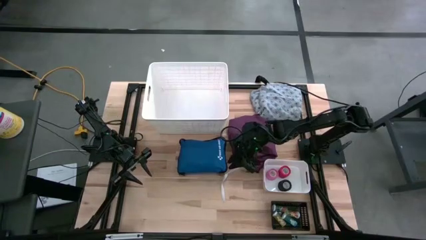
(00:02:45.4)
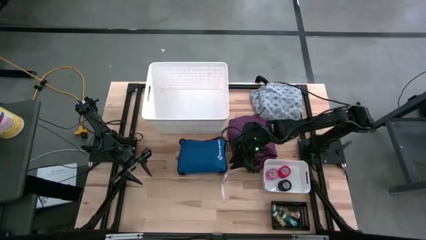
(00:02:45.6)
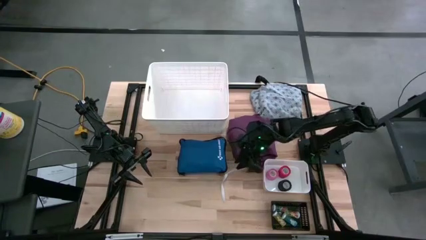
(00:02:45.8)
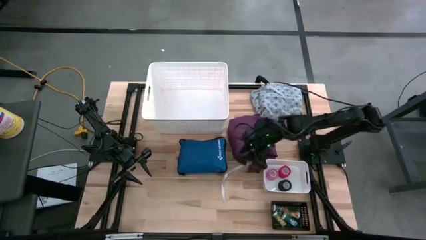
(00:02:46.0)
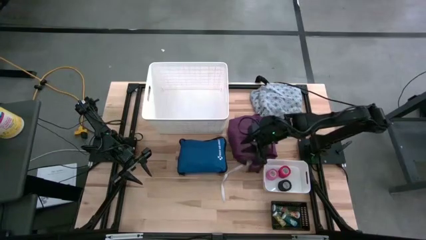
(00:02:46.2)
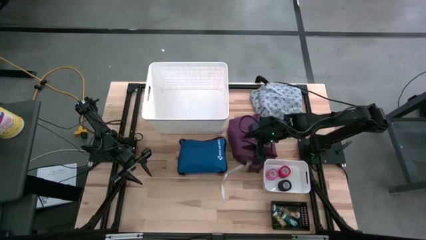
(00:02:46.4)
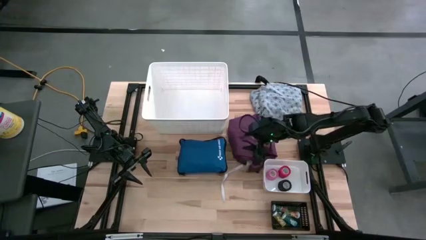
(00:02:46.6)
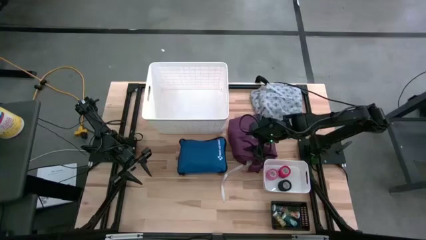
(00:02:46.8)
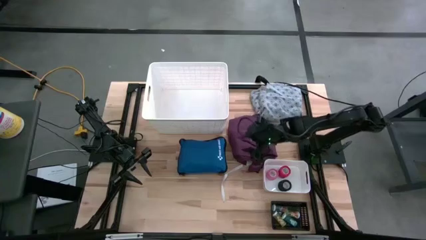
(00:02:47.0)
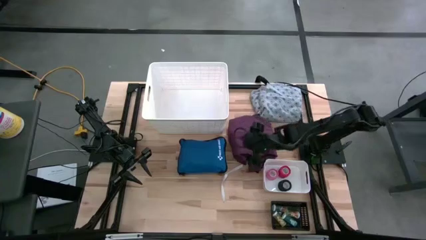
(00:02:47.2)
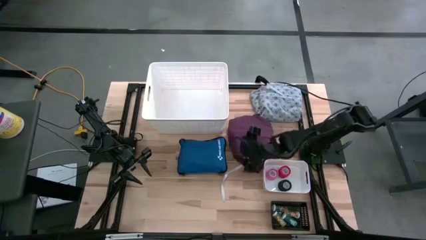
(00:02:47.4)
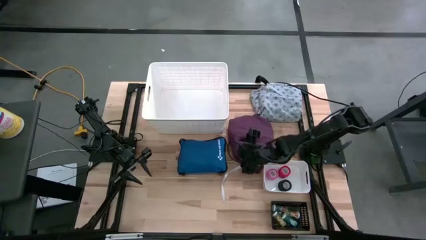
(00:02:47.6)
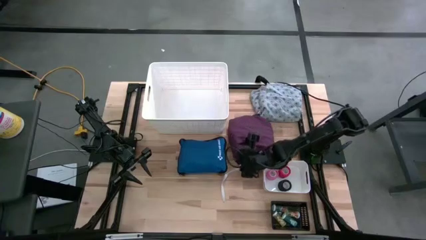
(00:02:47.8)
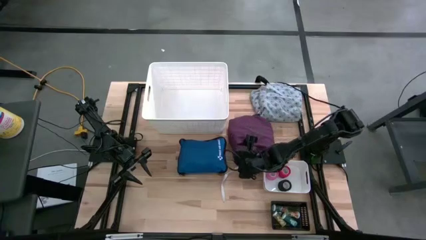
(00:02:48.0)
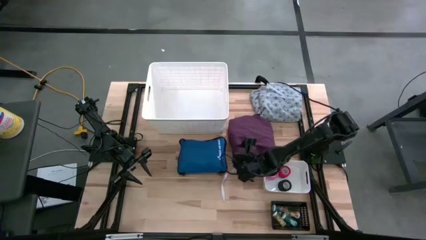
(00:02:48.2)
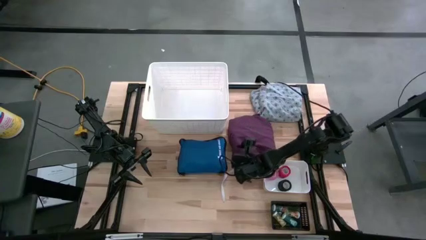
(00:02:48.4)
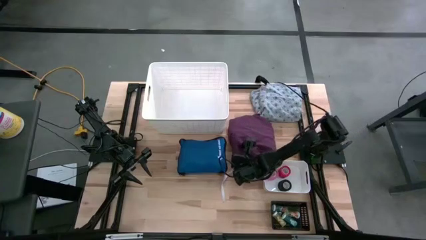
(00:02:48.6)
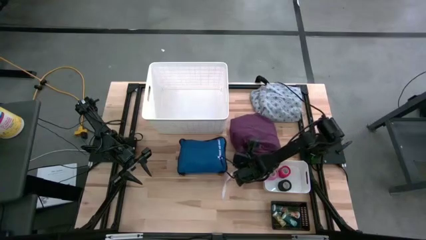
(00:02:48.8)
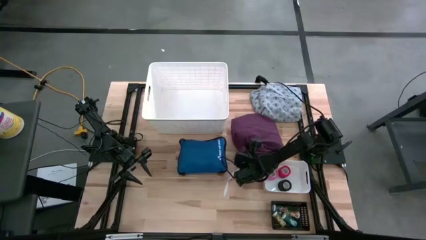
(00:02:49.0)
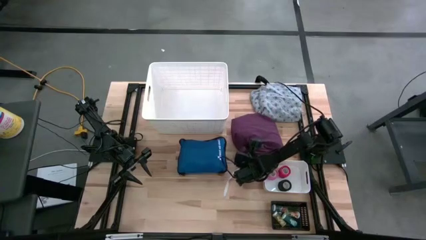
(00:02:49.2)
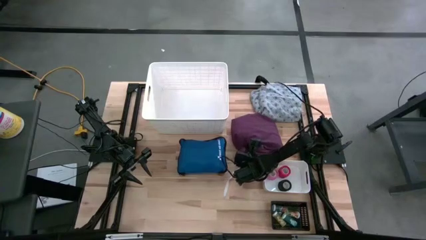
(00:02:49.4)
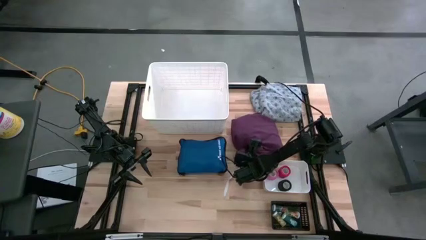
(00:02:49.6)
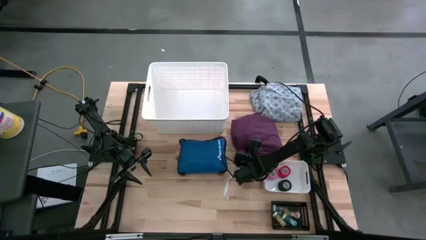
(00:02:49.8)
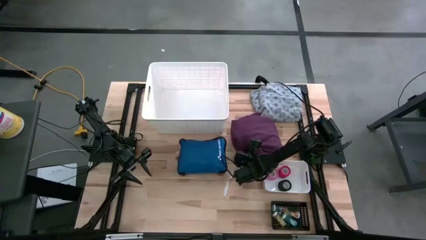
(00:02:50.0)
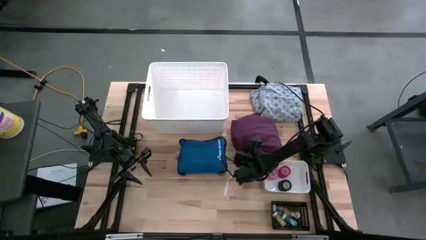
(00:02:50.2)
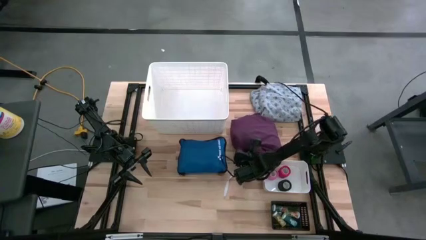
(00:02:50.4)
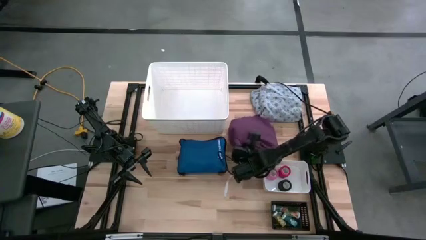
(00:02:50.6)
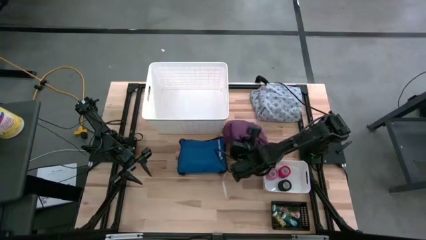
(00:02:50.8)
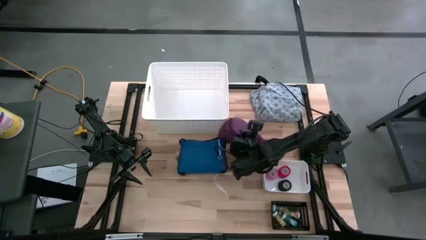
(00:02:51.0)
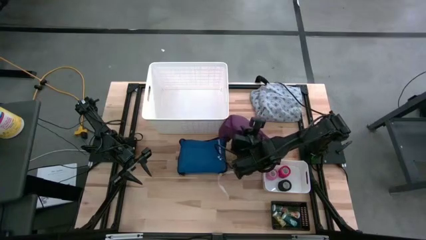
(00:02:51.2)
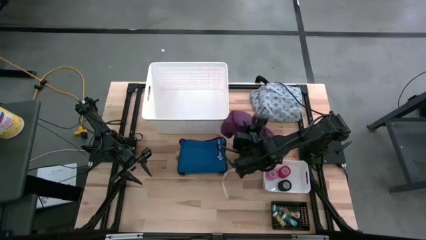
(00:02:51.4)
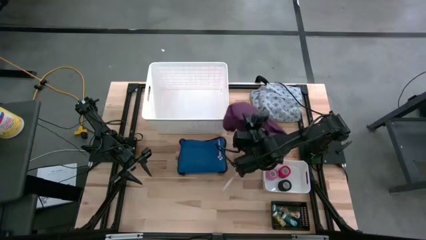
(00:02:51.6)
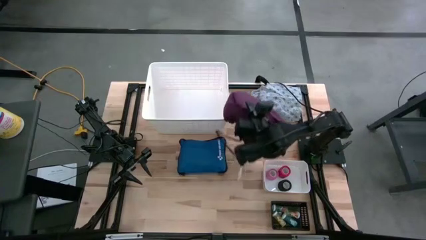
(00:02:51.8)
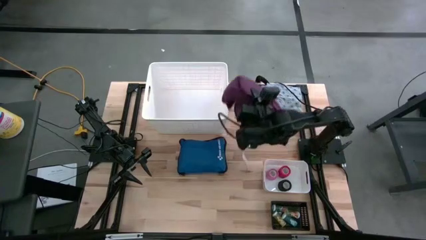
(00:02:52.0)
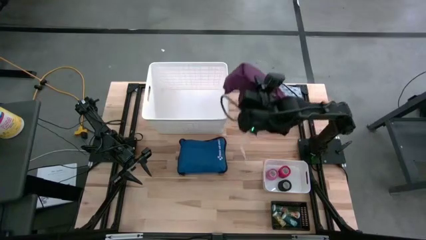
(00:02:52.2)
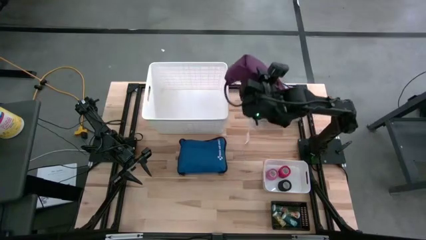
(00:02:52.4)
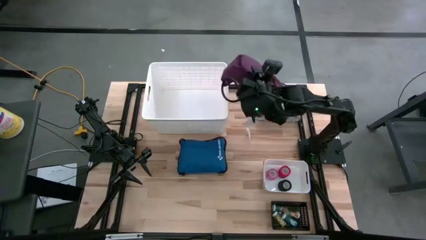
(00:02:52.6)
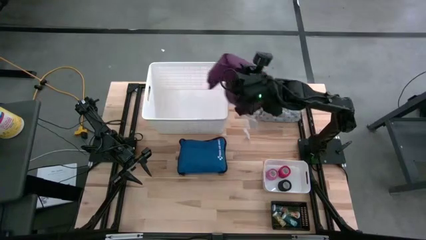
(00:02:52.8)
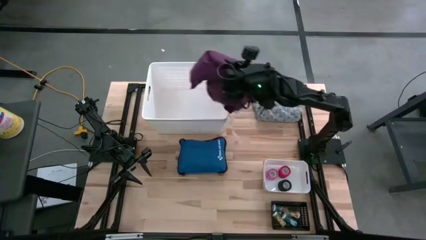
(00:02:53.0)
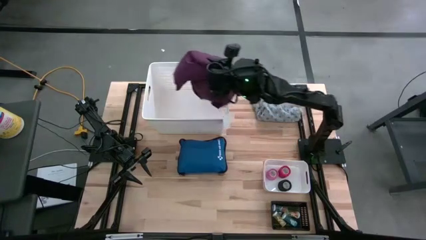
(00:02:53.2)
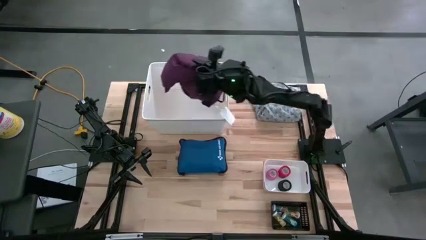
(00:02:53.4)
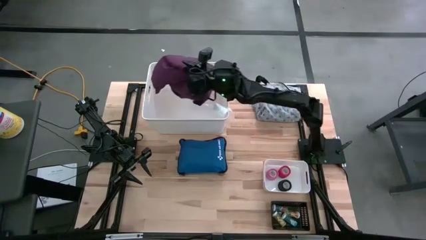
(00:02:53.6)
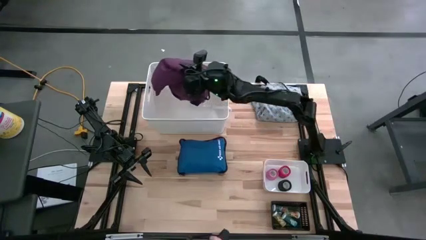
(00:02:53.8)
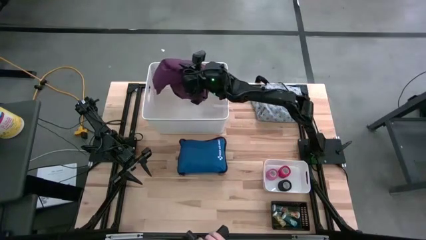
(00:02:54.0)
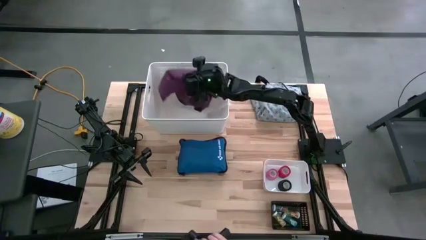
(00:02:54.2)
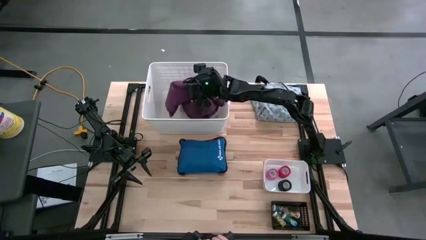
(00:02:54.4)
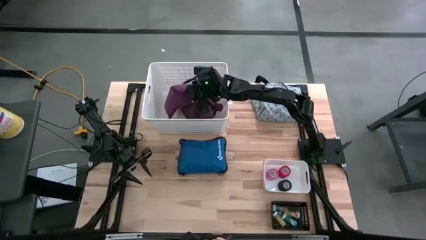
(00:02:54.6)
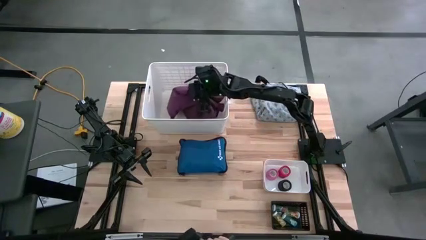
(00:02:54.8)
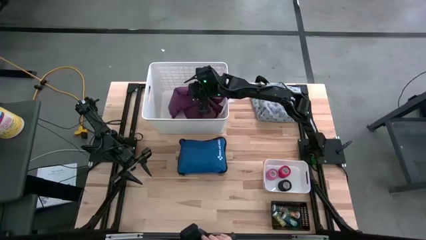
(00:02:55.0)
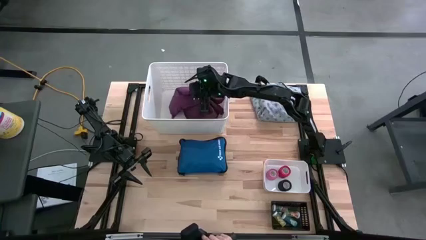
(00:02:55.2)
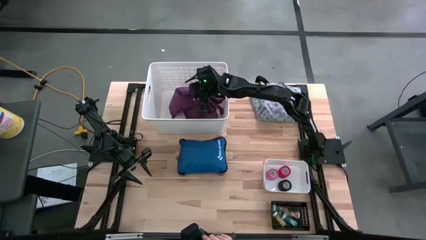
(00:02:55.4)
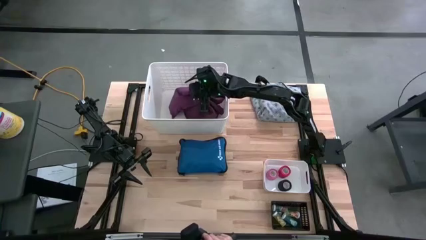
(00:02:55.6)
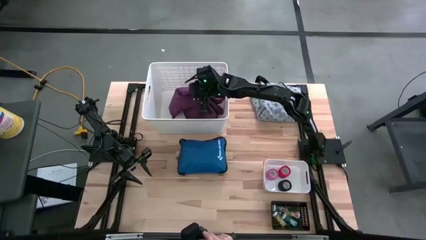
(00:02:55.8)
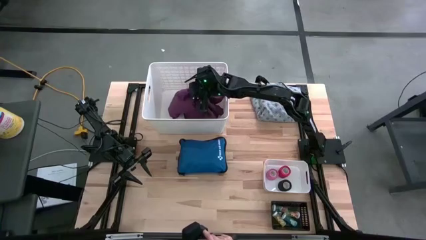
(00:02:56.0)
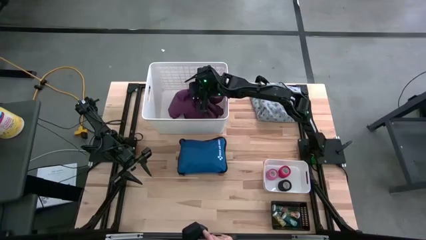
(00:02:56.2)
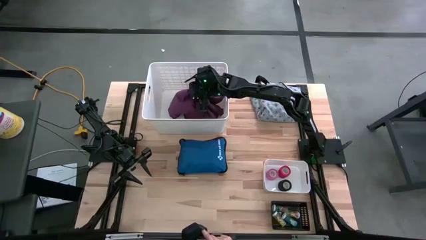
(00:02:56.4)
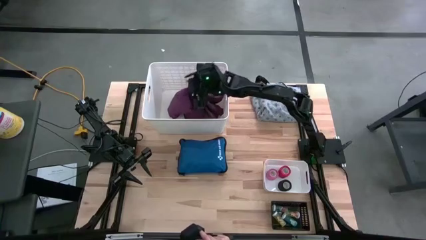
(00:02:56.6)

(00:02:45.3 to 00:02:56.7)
Task: Pick & Place Medicine items
Put the violet patient gown into the white laundry bin

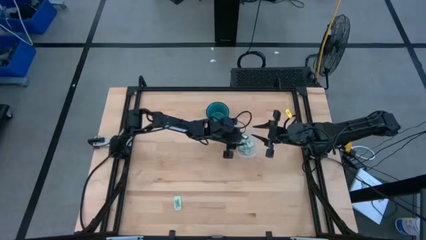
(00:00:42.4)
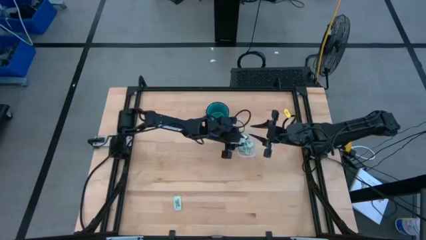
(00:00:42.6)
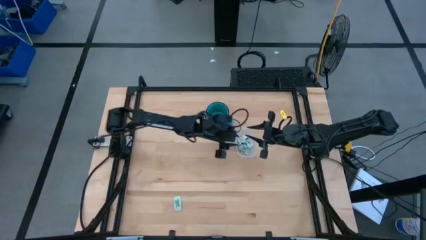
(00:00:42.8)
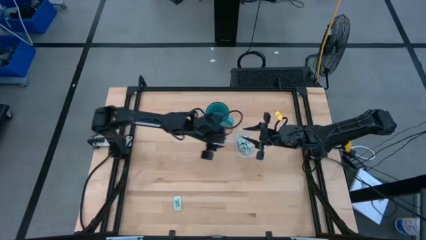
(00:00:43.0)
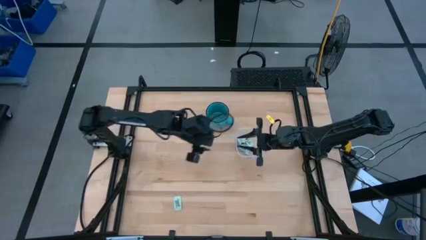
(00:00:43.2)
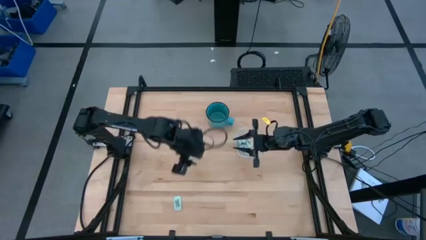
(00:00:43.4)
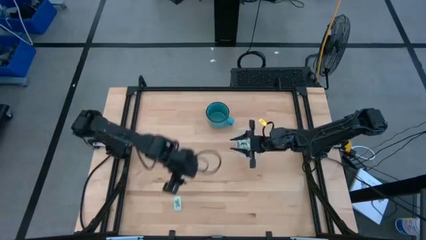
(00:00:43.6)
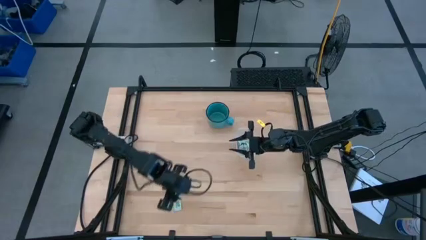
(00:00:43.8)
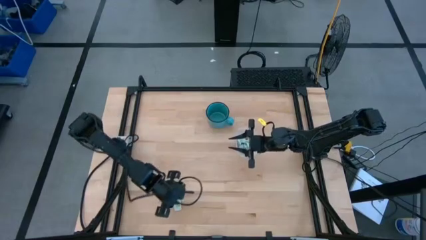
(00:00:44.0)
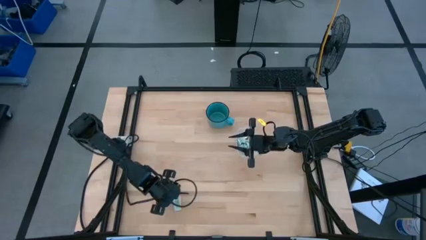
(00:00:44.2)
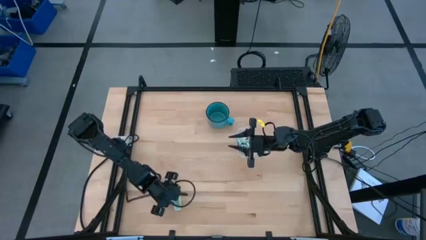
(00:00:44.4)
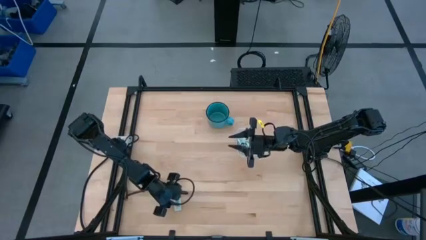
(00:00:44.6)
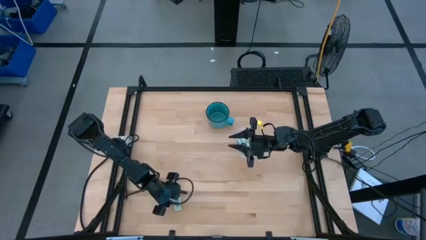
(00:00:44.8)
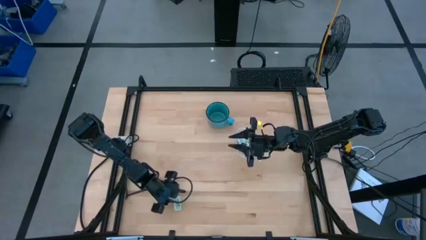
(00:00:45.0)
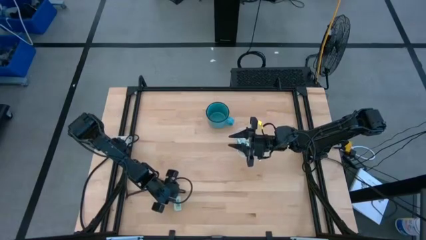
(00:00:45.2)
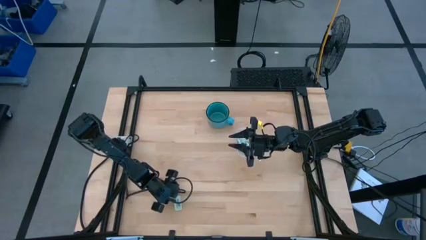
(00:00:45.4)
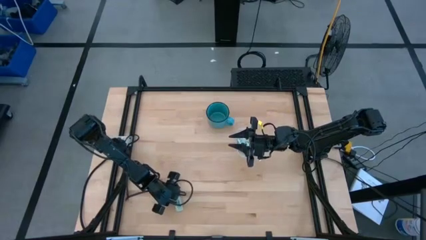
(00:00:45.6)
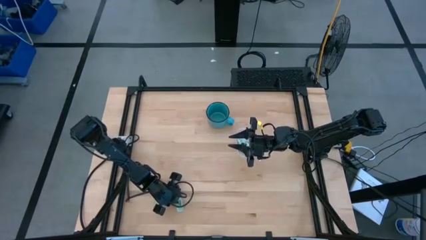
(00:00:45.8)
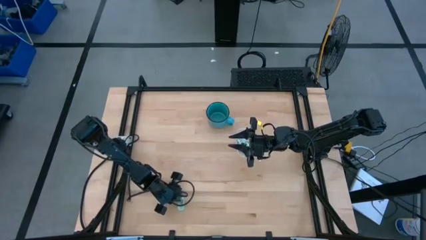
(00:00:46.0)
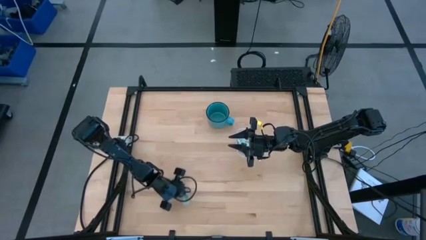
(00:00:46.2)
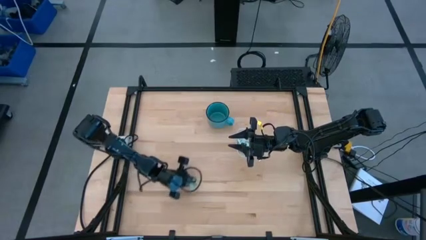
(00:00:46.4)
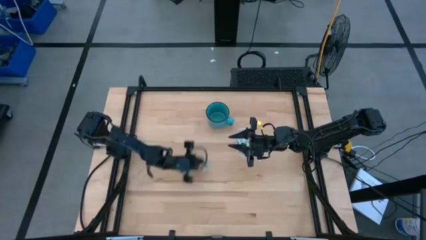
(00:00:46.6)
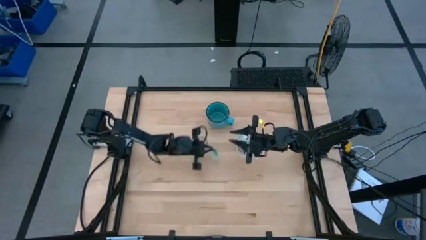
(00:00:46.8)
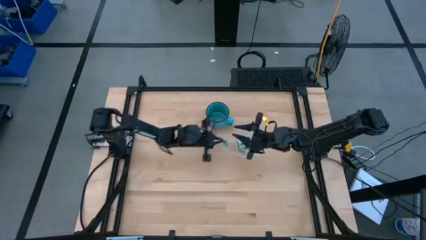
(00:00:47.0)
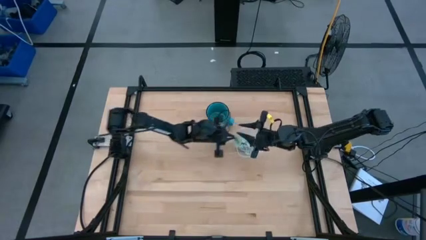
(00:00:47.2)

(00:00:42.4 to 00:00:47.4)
Task: Pick and place Stevia / Truvia into bins
Put the stevia packet into the transparent bin
